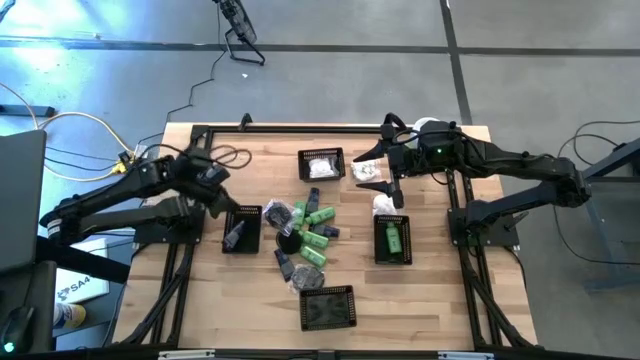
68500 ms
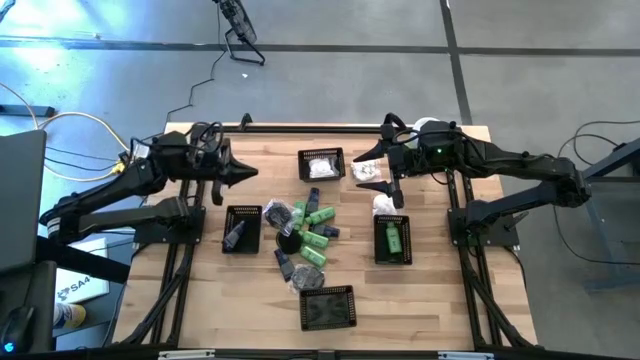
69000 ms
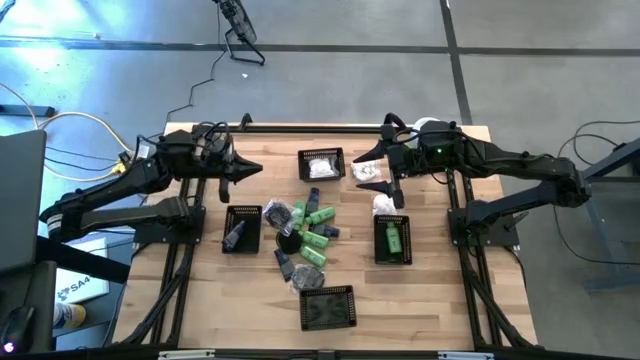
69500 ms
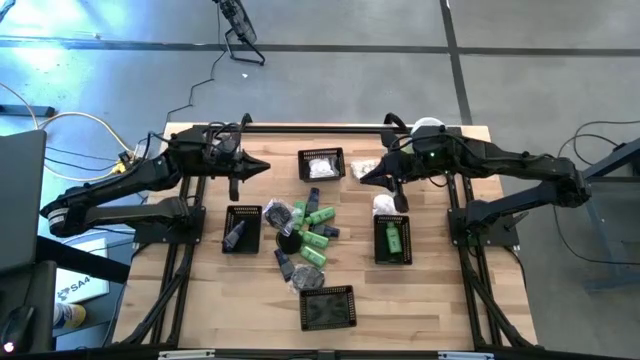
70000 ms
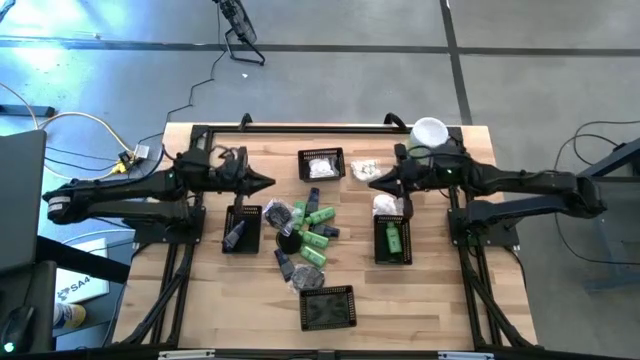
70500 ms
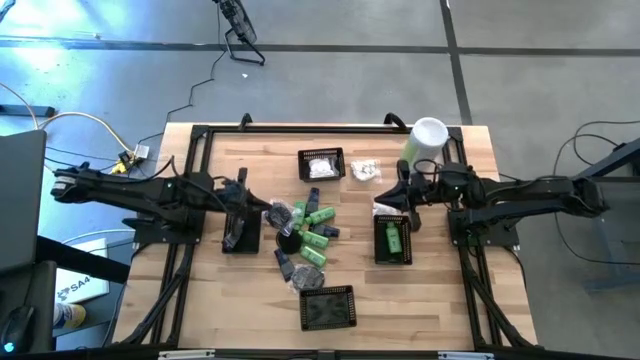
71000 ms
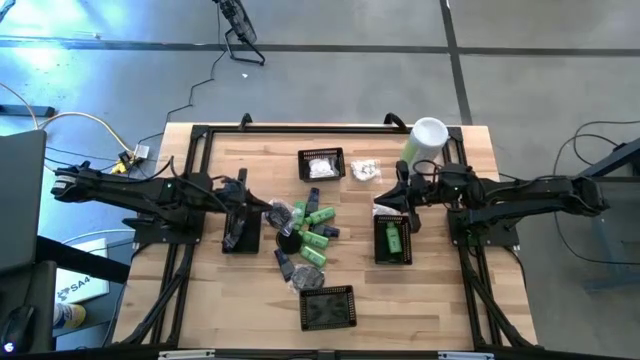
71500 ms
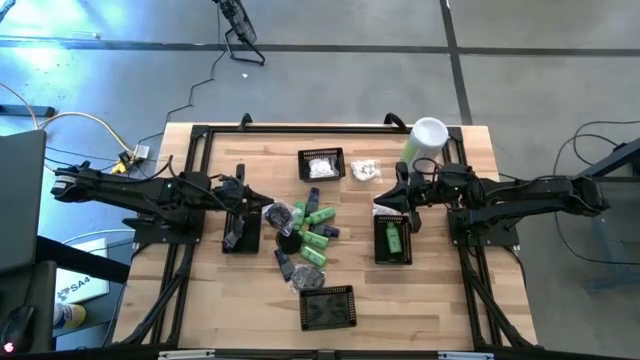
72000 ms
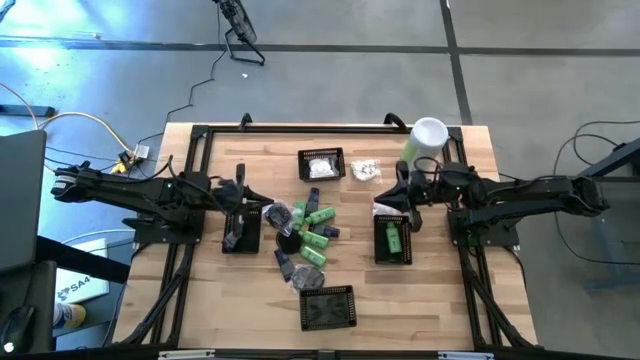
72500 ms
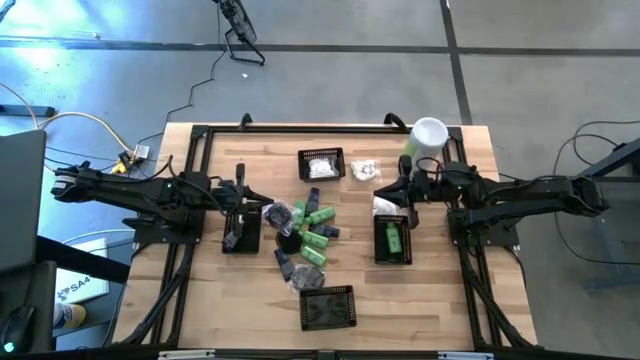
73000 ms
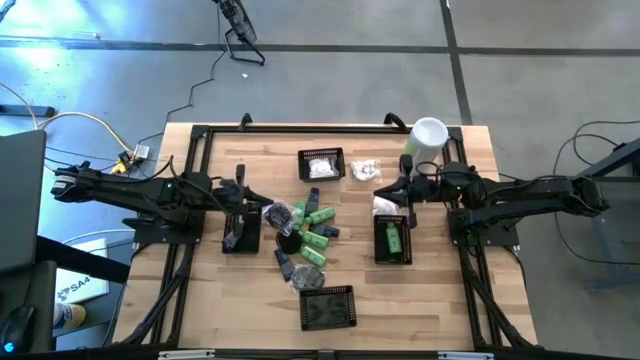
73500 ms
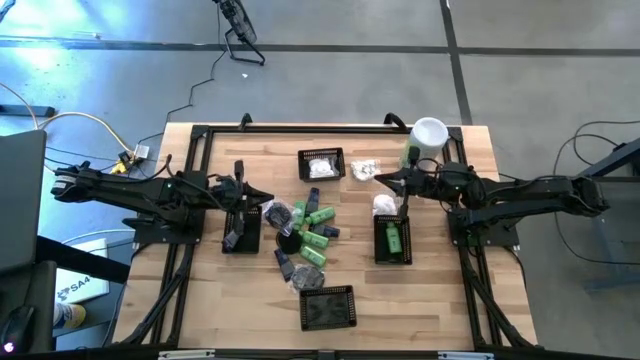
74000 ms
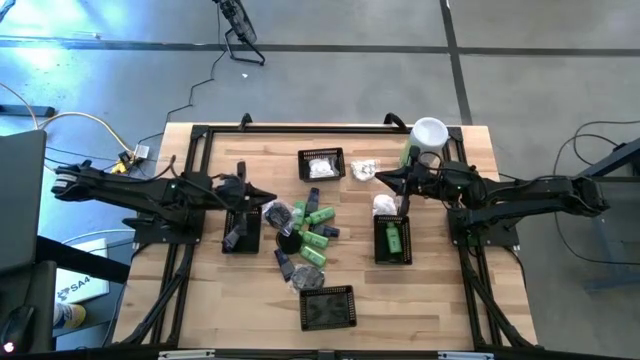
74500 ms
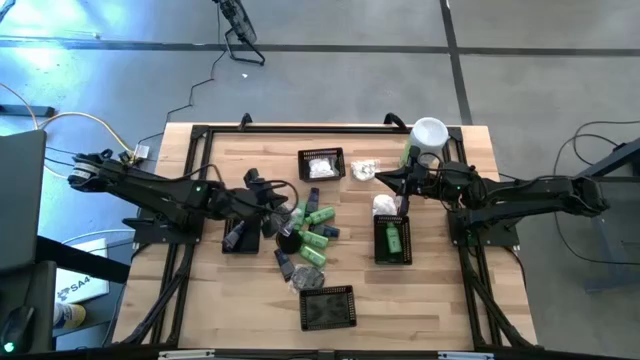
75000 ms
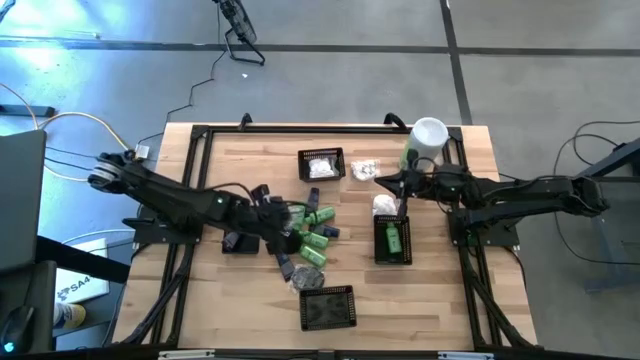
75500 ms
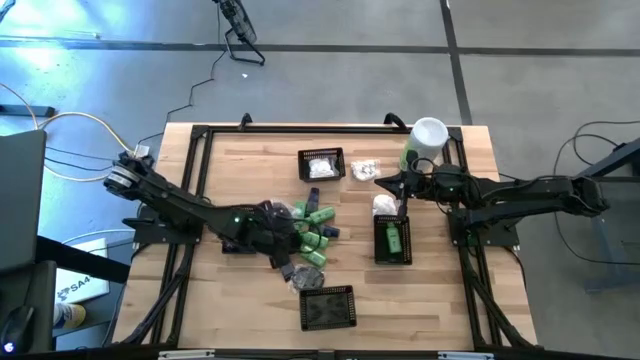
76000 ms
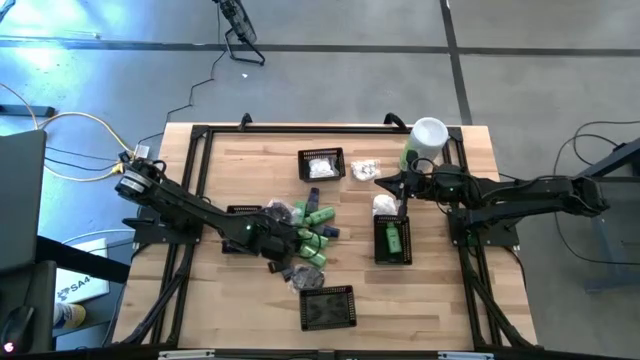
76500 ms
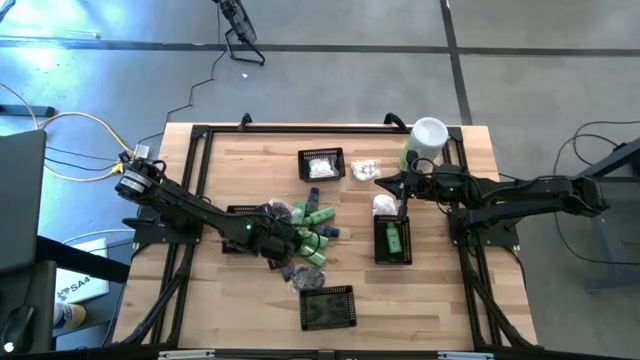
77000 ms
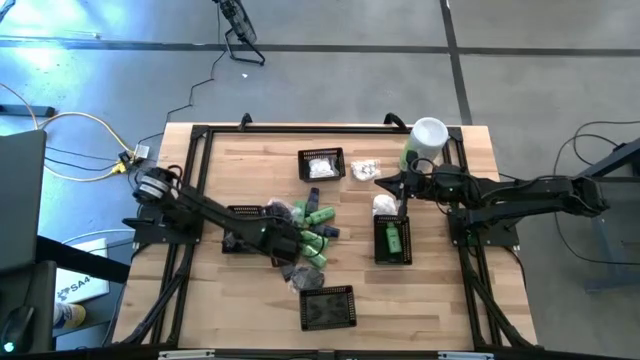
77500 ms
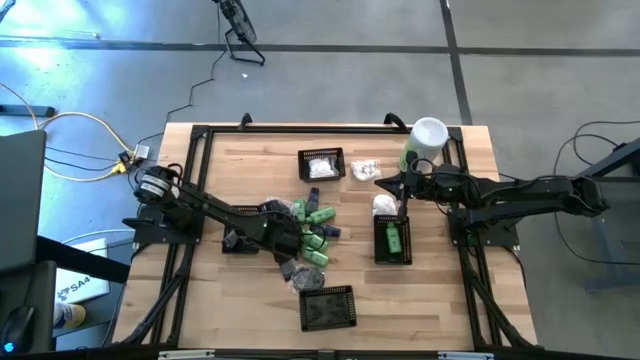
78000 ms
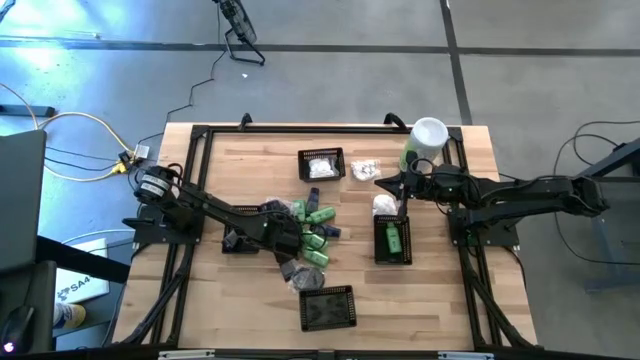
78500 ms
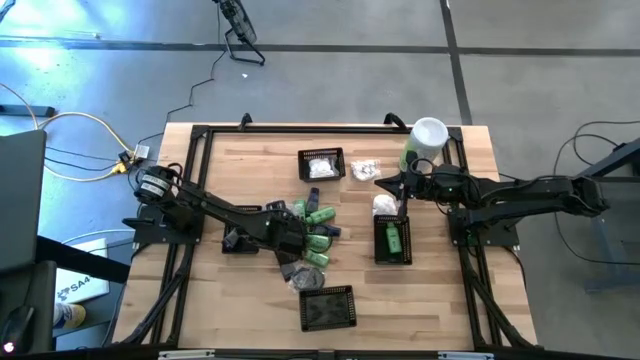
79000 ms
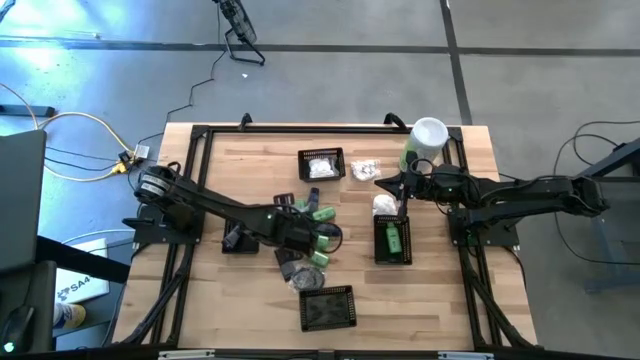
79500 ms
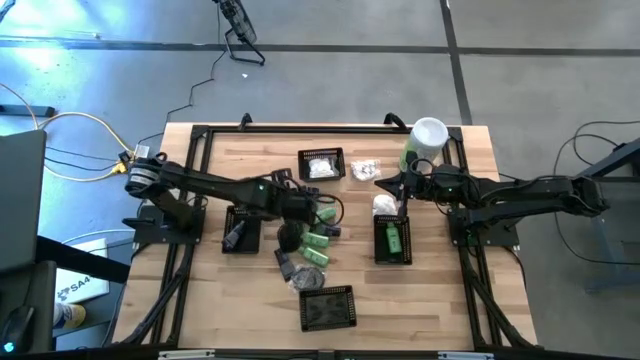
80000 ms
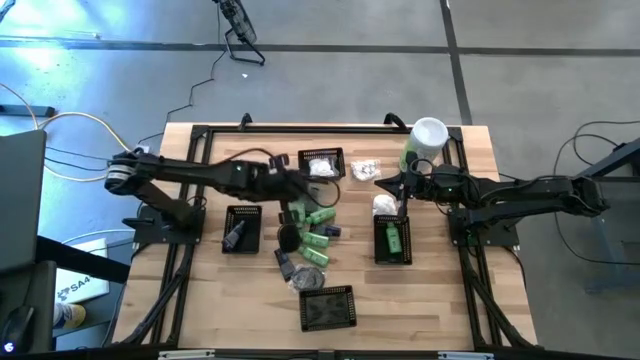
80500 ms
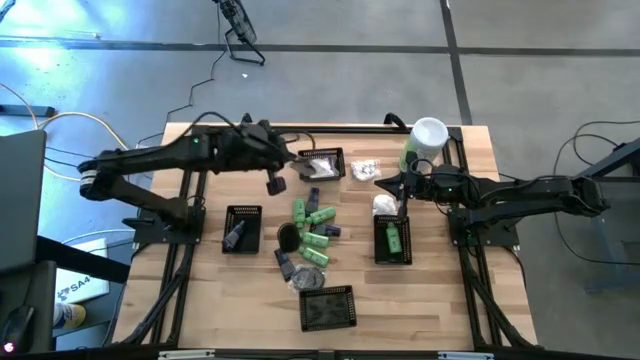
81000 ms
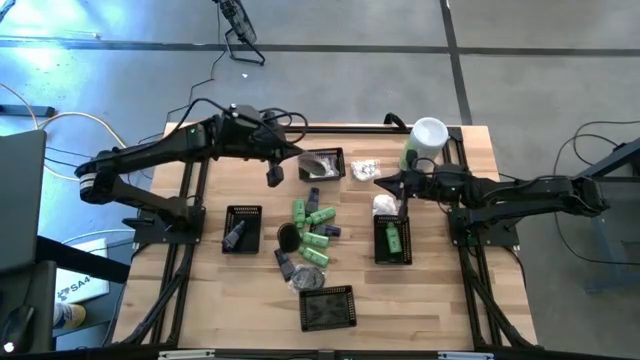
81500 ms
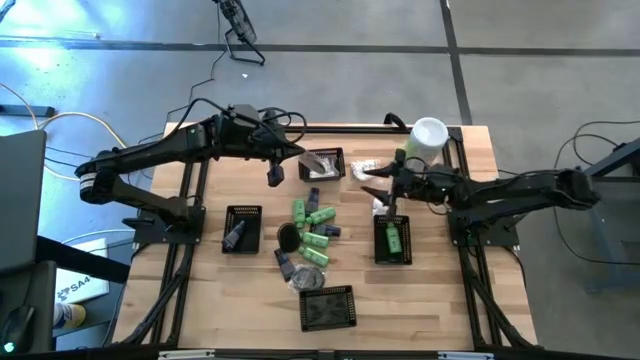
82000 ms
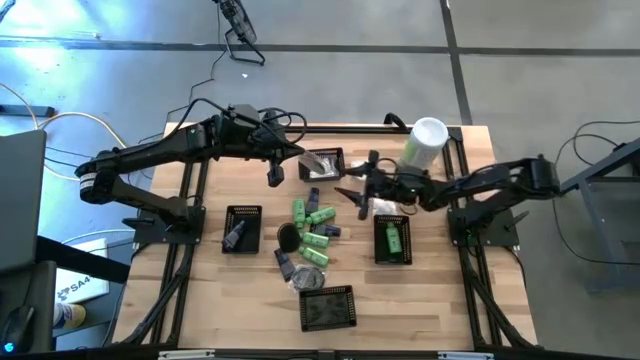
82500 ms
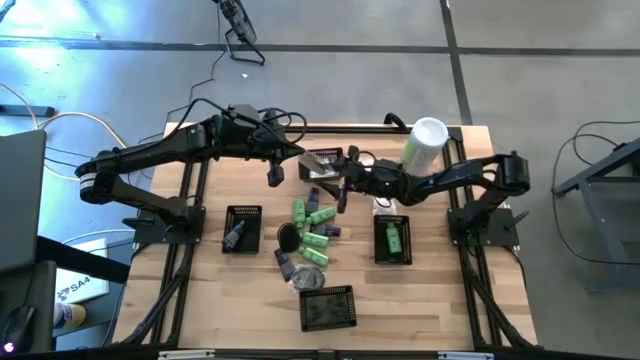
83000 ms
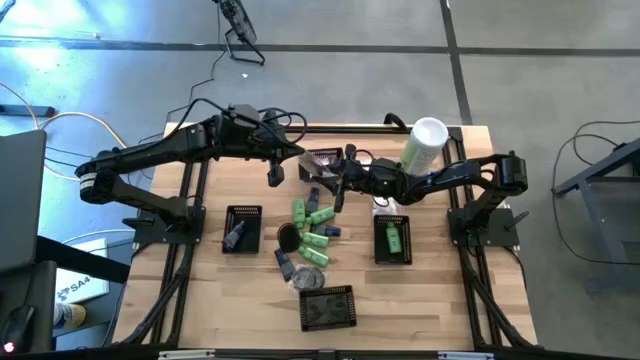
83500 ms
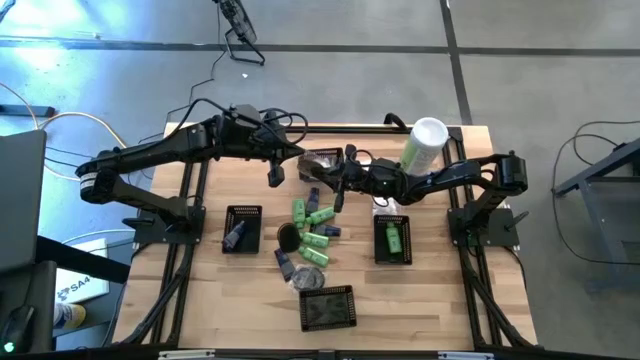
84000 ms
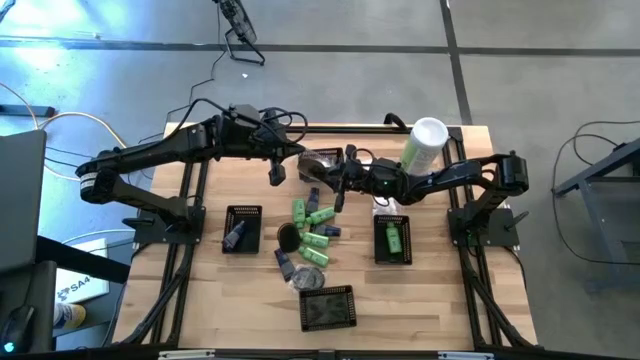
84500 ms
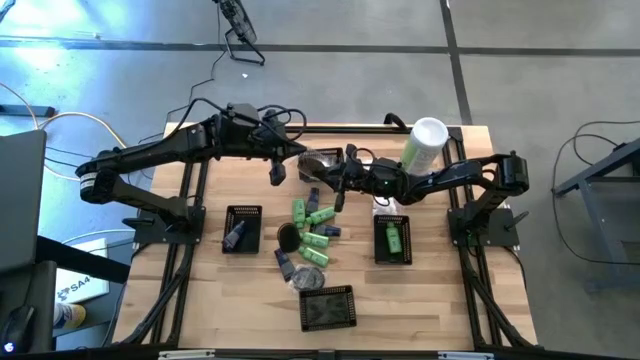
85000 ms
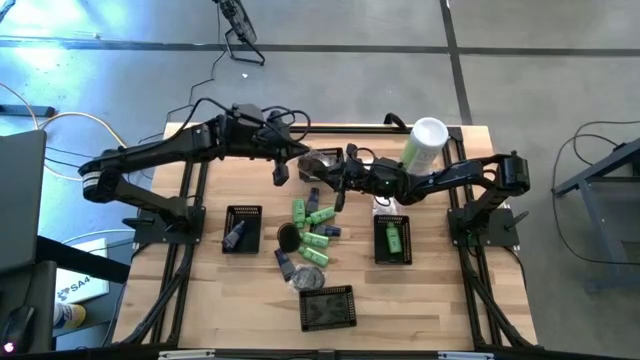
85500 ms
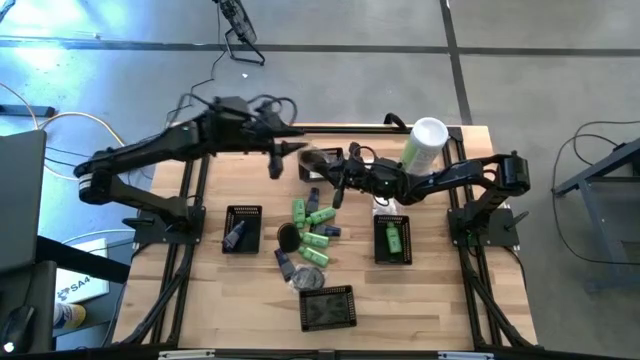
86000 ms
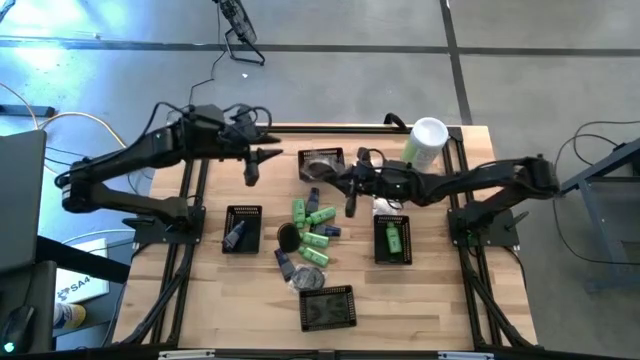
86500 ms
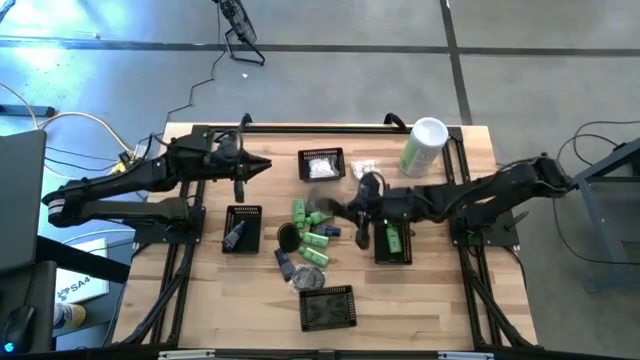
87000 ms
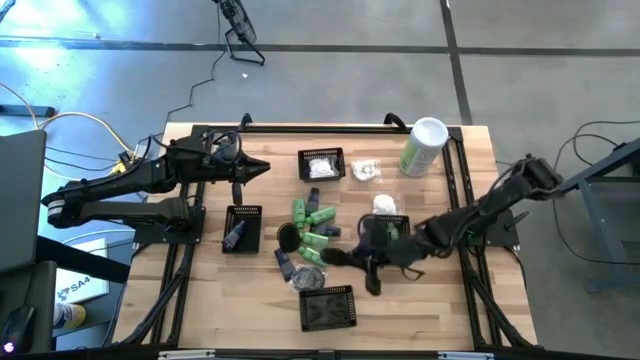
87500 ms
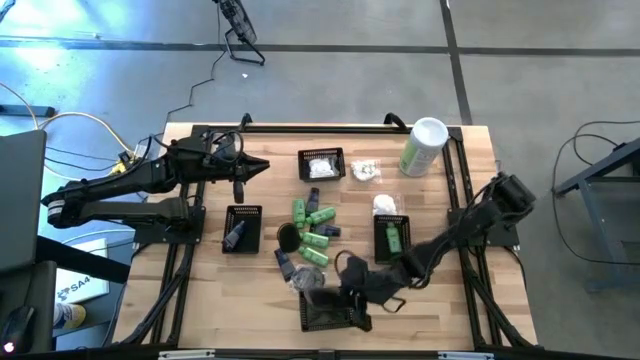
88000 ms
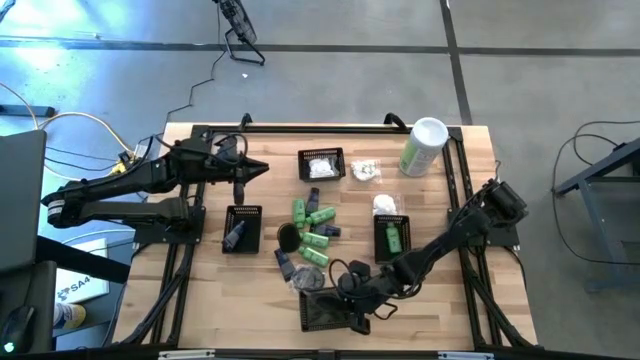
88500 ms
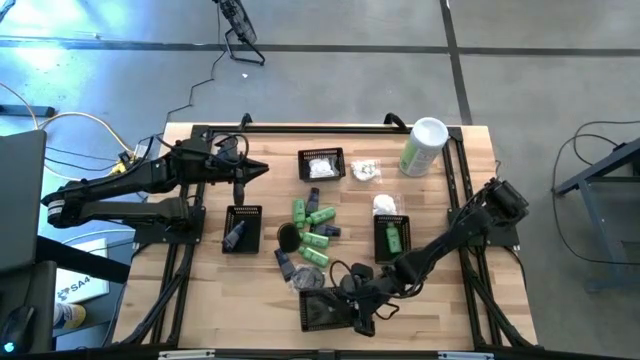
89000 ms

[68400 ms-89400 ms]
Task: Pick & Place Travel size toiletries
Put the left black brush into the bottom middle black bin
